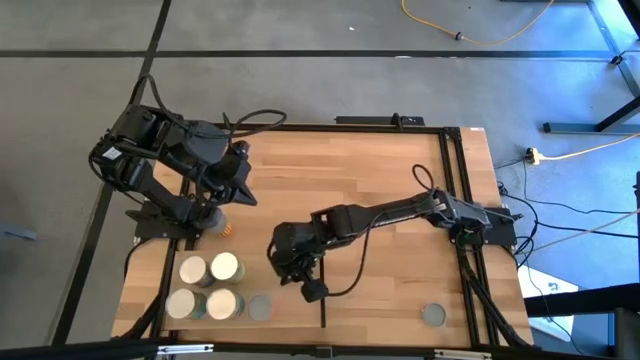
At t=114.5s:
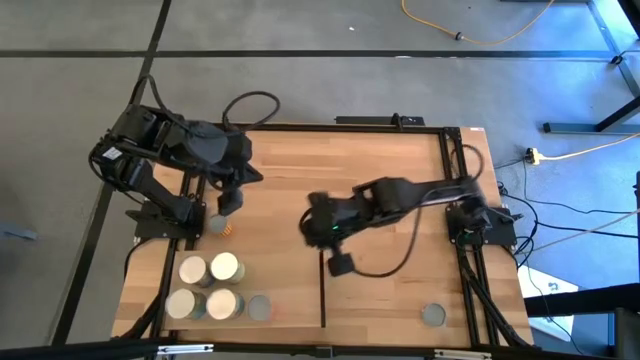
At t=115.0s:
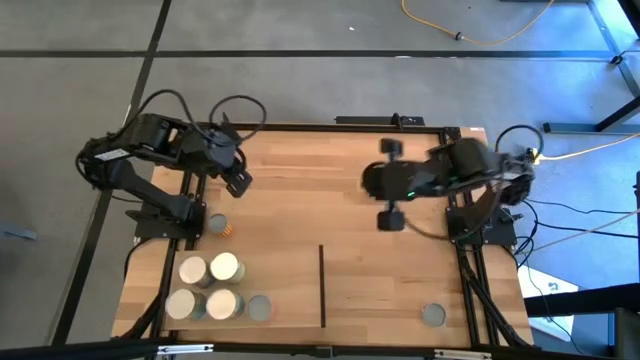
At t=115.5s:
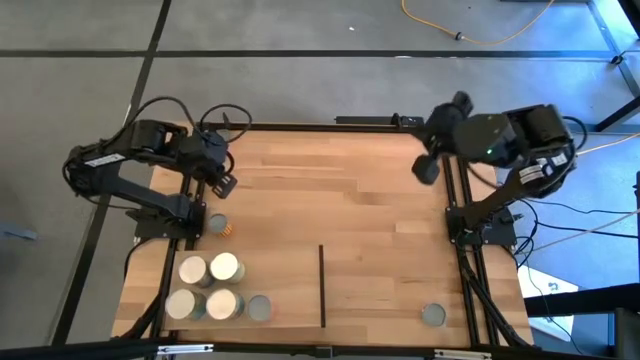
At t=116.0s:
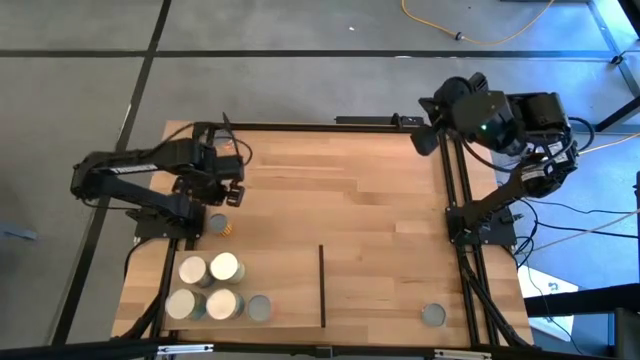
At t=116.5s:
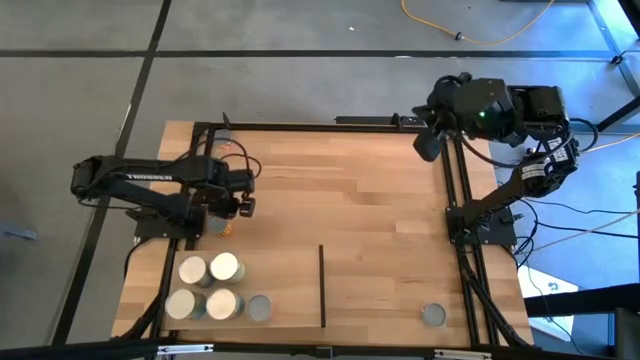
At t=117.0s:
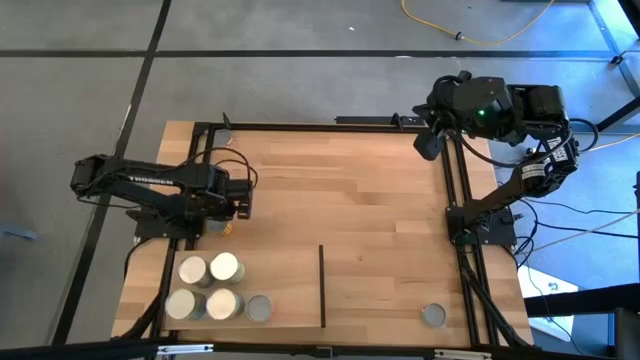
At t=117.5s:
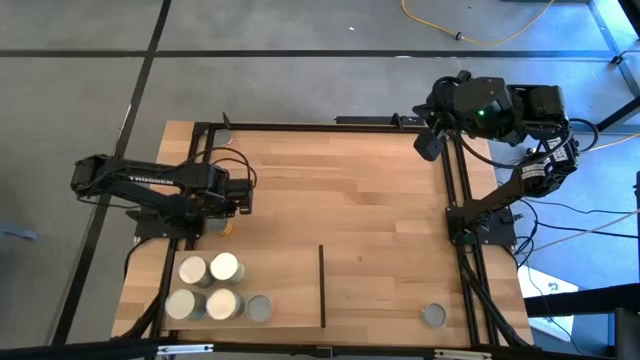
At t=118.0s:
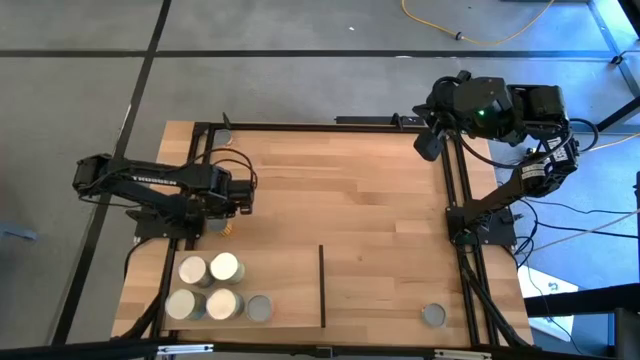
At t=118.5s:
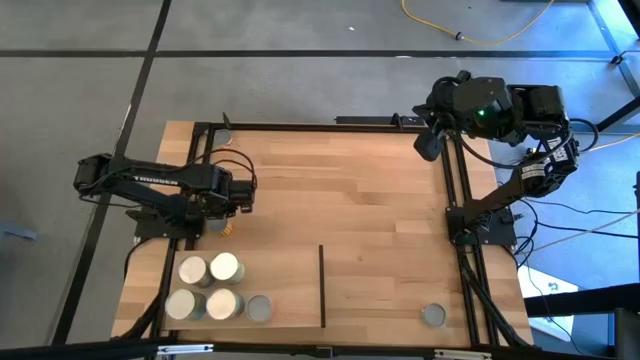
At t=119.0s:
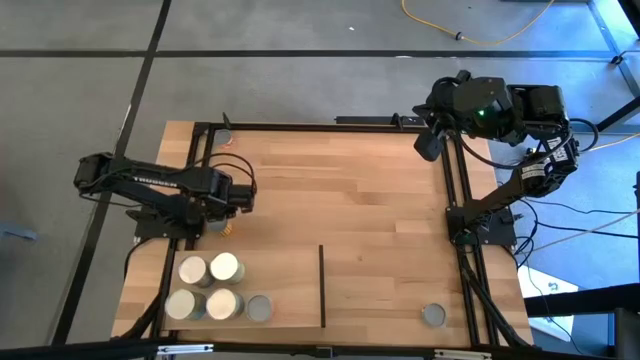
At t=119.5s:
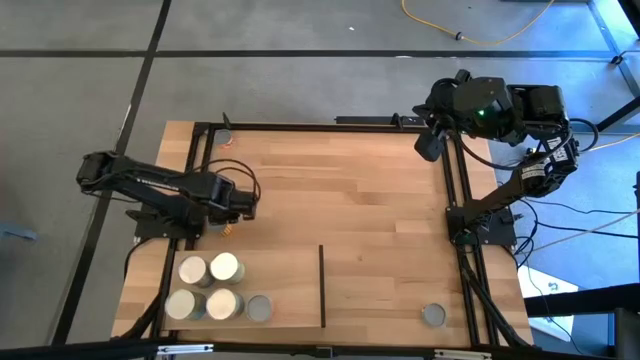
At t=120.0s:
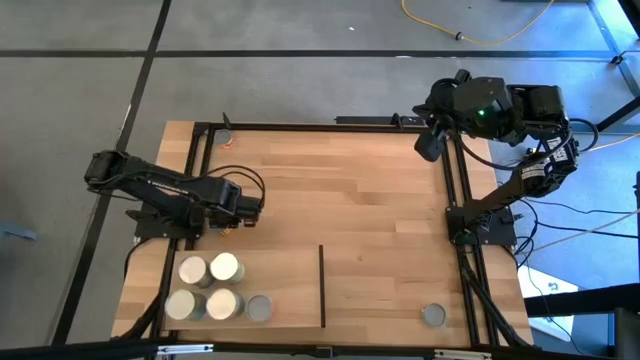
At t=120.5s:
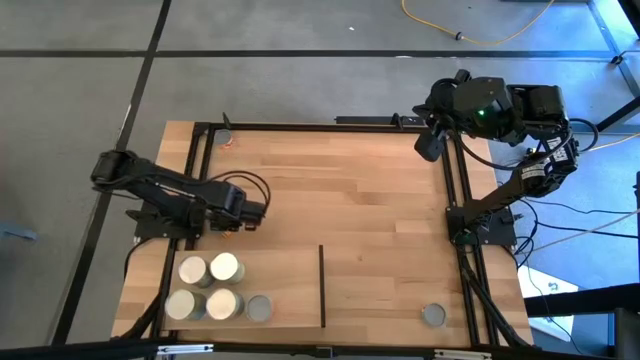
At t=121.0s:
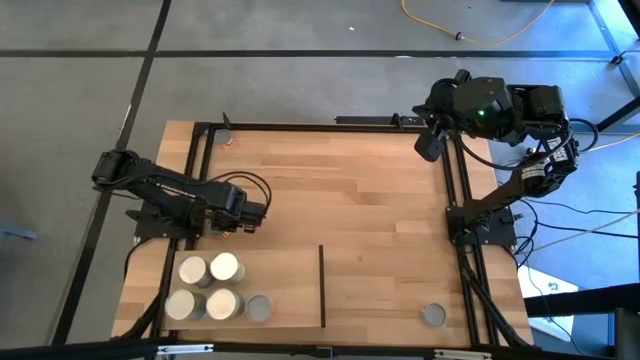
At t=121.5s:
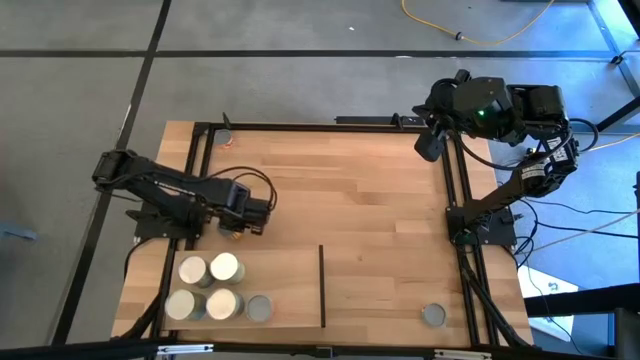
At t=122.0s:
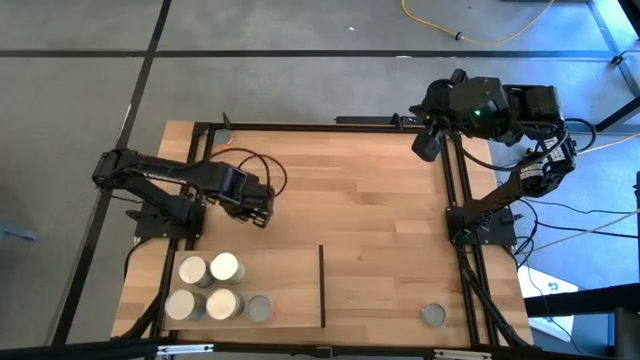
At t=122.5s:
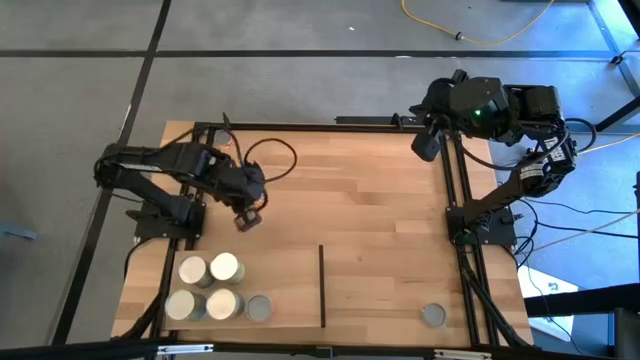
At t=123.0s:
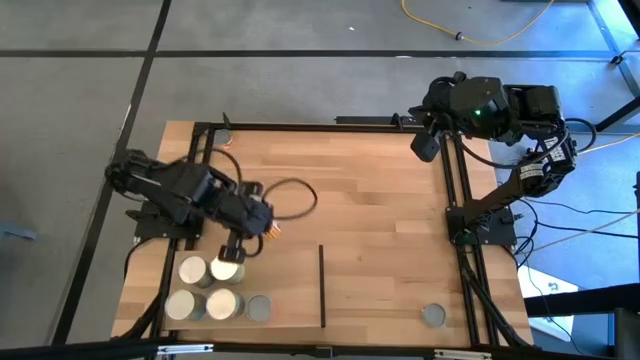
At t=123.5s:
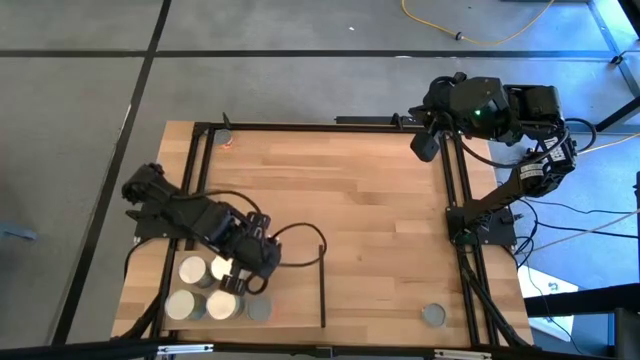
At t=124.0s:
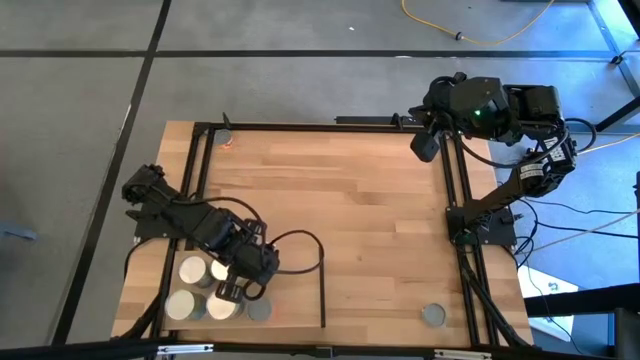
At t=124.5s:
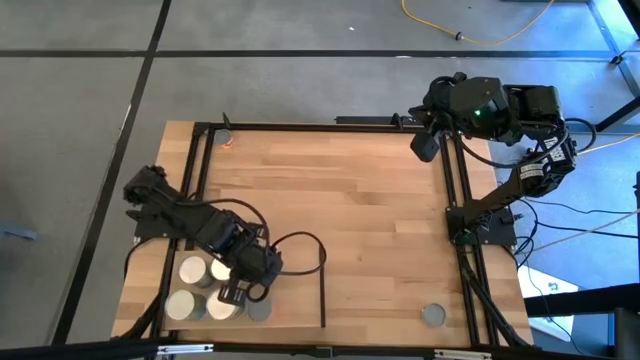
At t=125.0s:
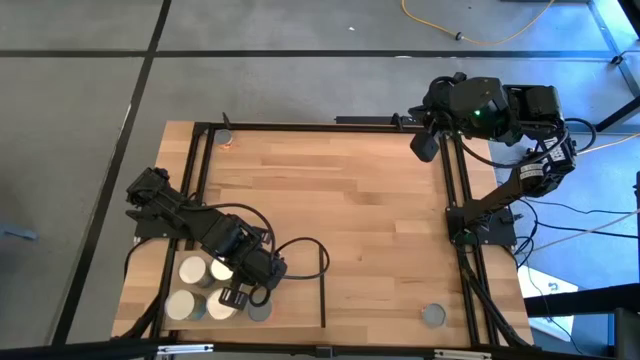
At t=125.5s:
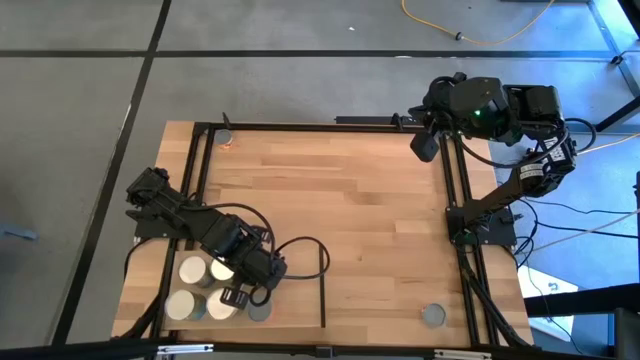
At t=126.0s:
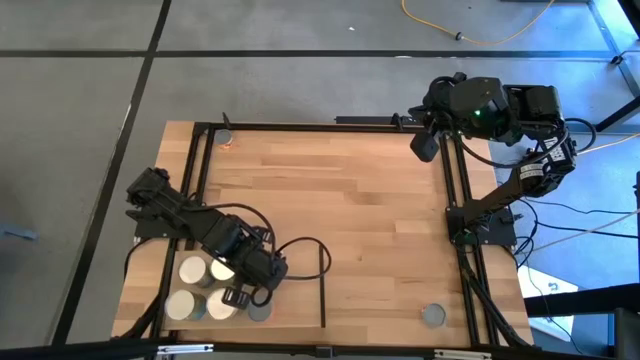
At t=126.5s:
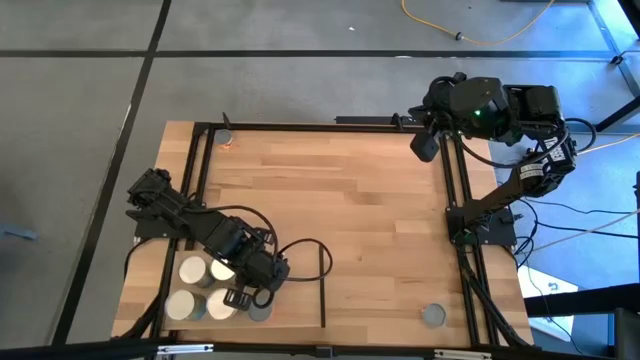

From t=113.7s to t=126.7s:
Task: Pick and place cans onto a shelf
Put the canned black beans on the shelf

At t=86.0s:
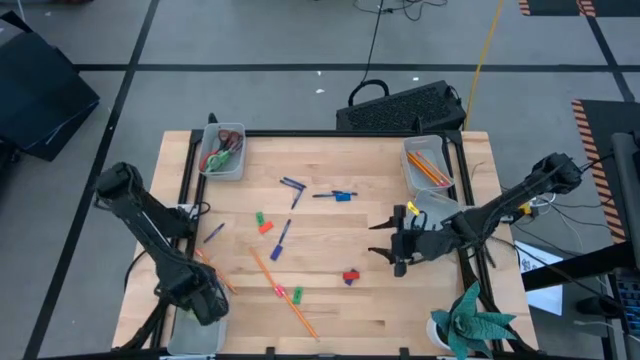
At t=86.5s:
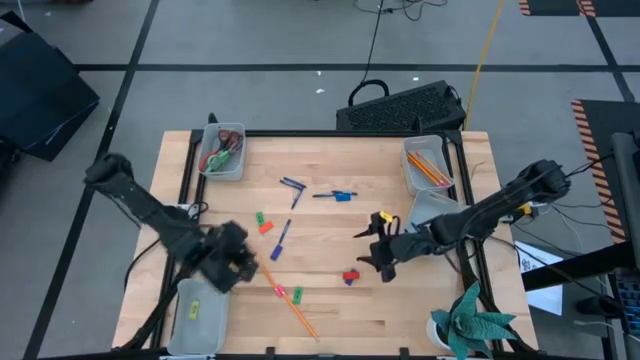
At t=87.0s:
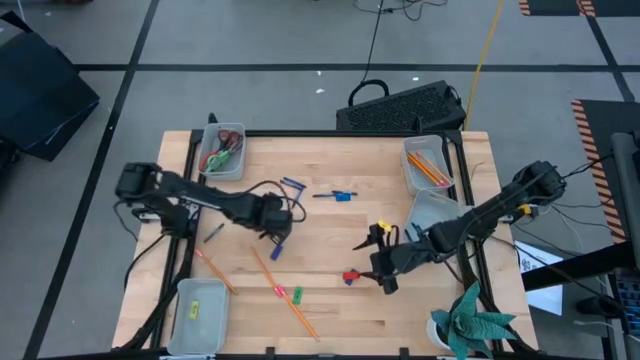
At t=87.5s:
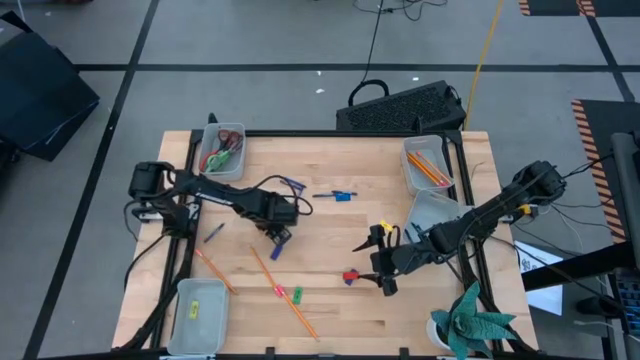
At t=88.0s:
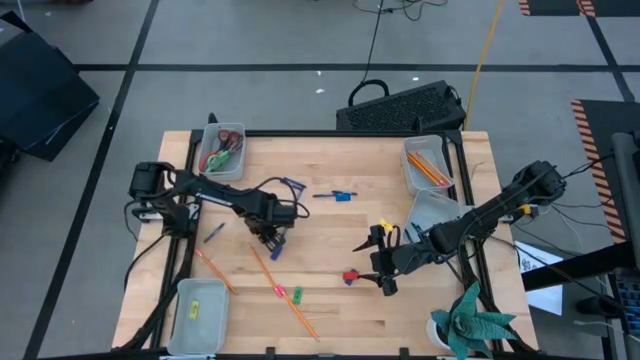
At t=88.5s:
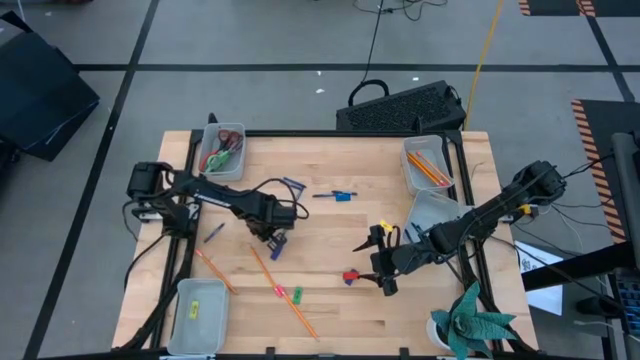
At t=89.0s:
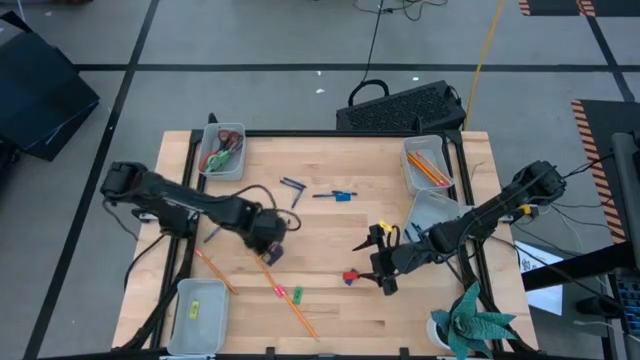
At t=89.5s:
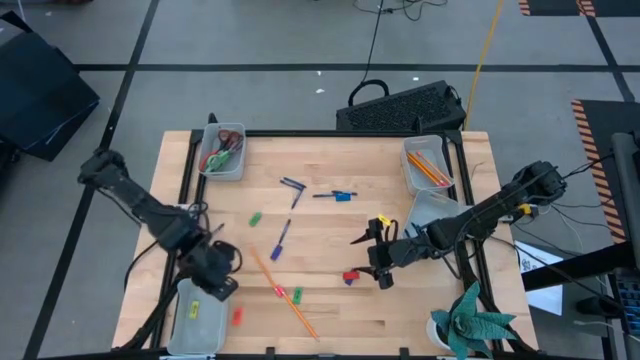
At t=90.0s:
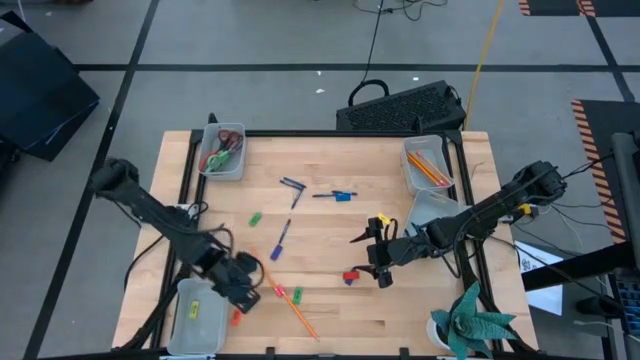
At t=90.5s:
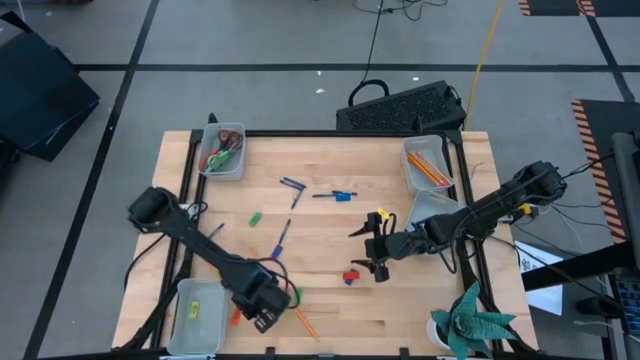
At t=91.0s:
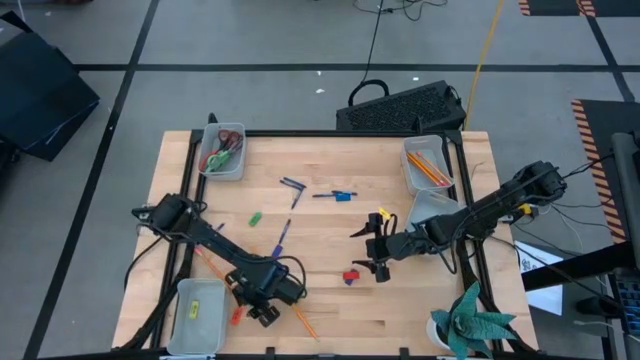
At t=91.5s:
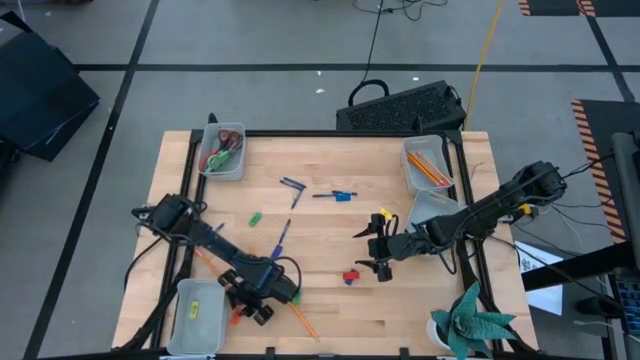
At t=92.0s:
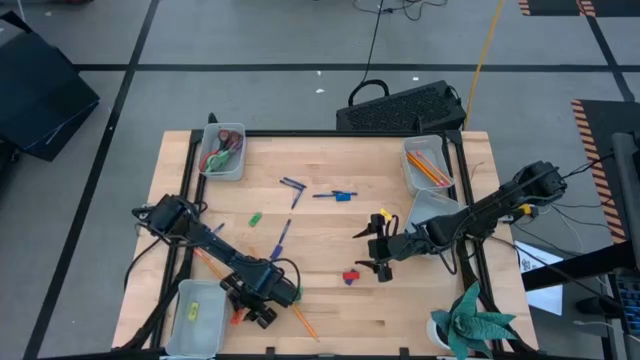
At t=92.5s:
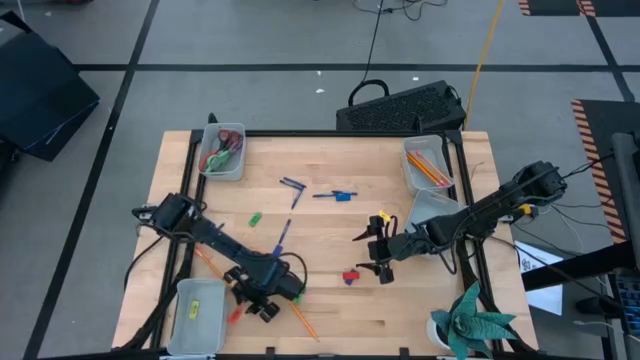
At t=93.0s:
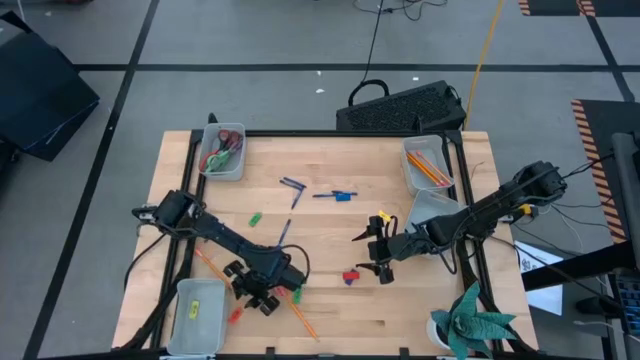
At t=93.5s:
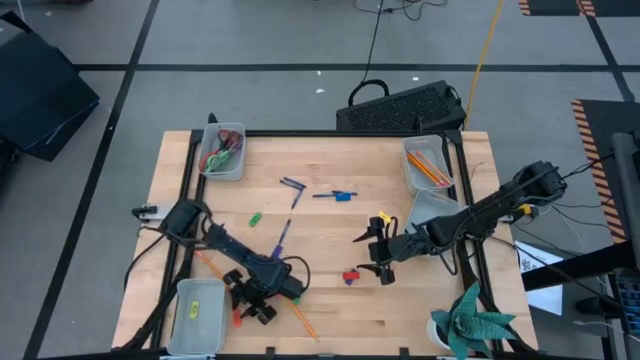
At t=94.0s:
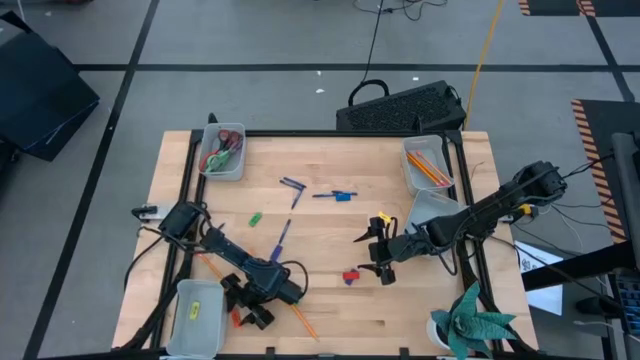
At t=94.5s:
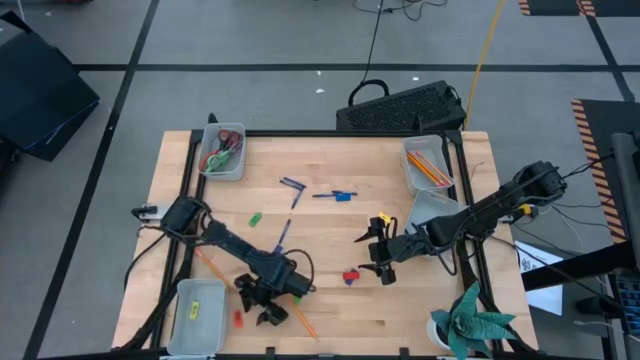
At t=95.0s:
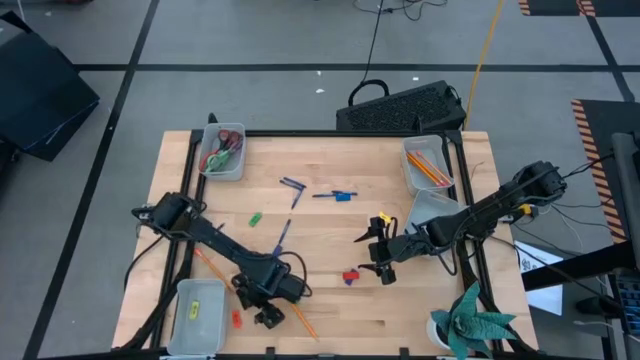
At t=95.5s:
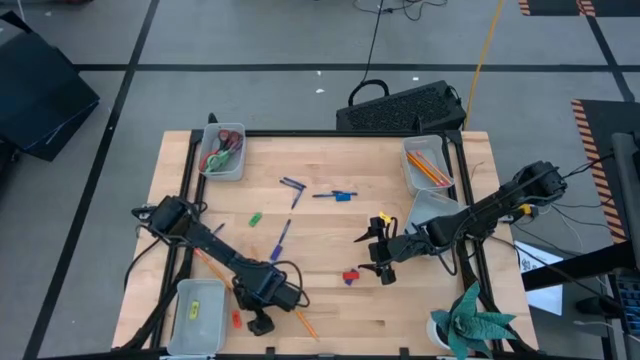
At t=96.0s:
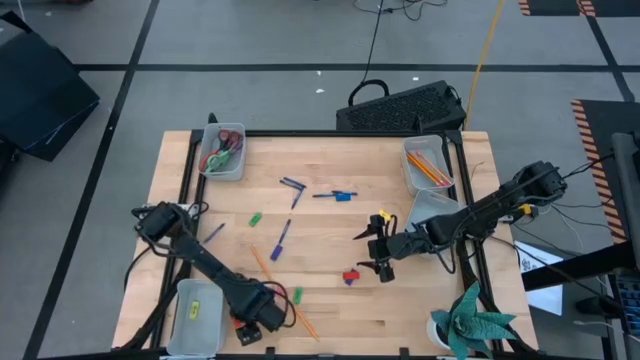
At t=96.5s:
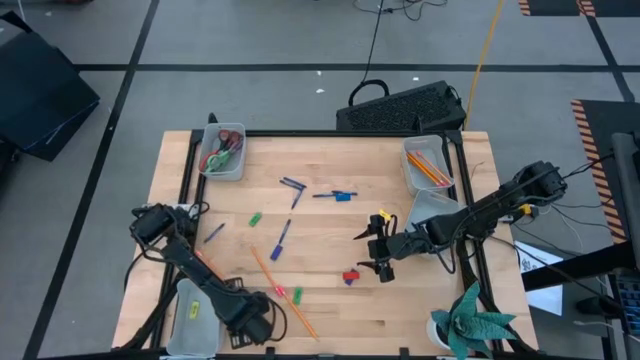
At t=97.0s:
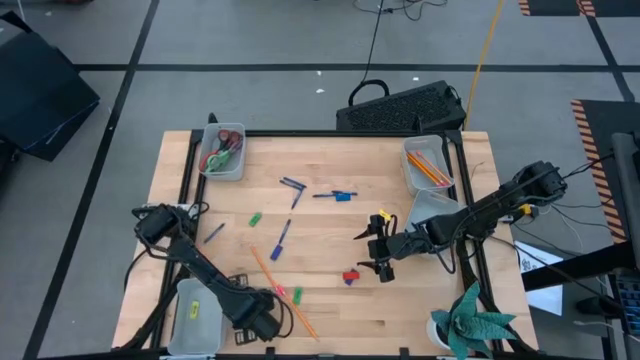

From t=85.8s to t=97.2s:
Task: Sort crayons/erasers/pens/pencils in bins
Put the orange eraser into the bottom left gray bin
